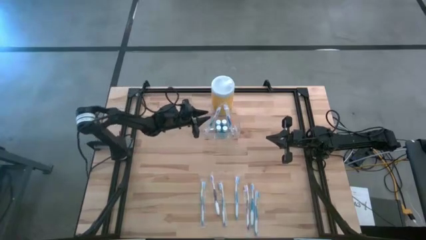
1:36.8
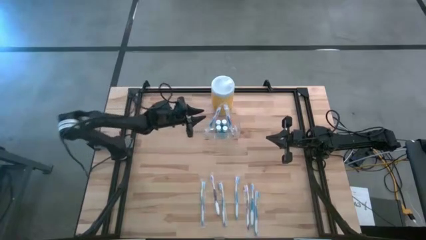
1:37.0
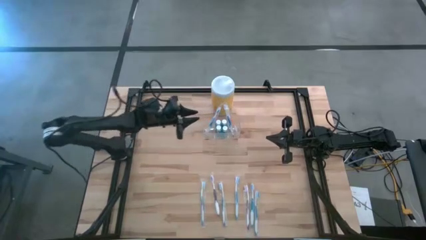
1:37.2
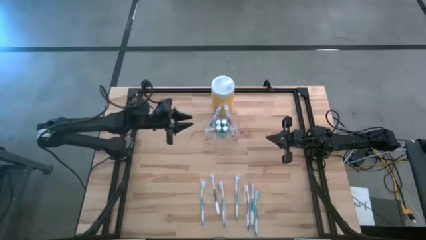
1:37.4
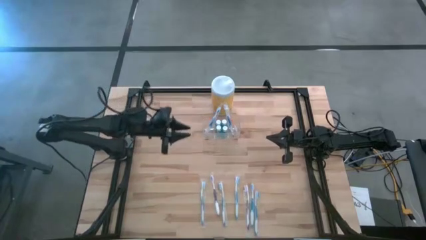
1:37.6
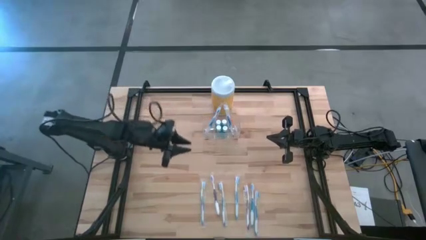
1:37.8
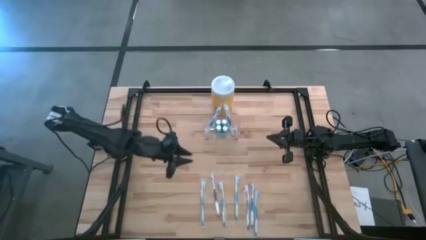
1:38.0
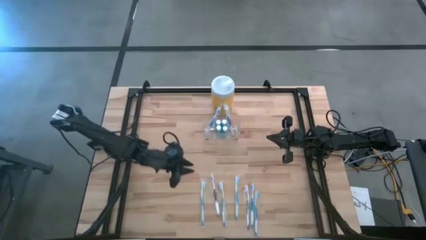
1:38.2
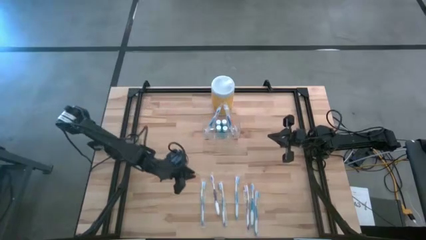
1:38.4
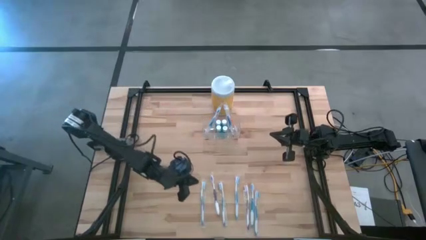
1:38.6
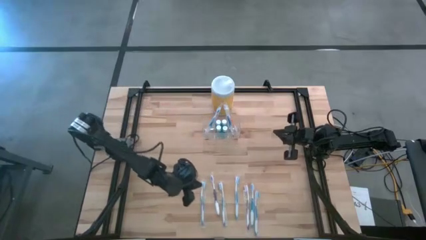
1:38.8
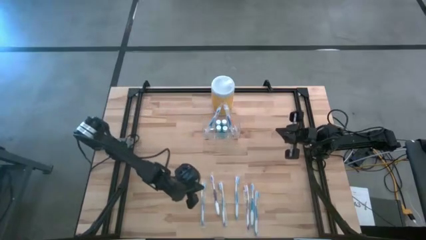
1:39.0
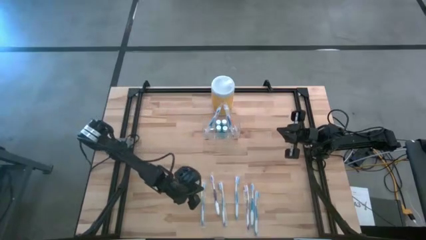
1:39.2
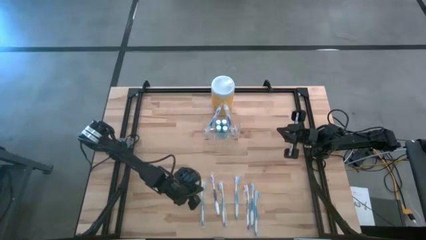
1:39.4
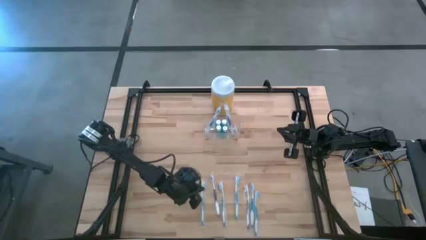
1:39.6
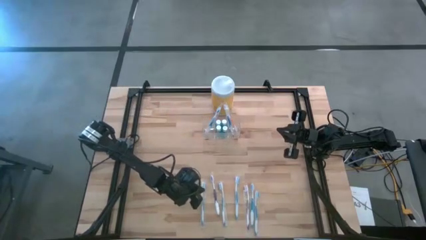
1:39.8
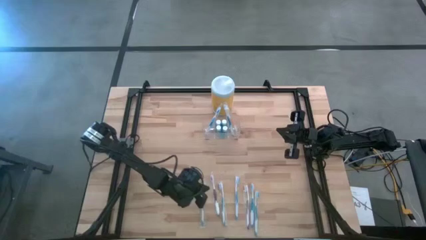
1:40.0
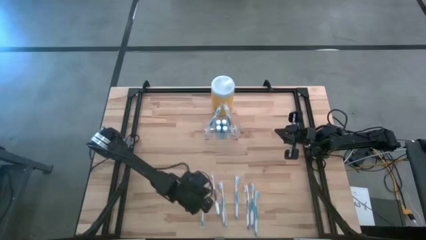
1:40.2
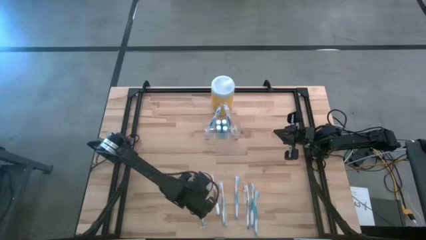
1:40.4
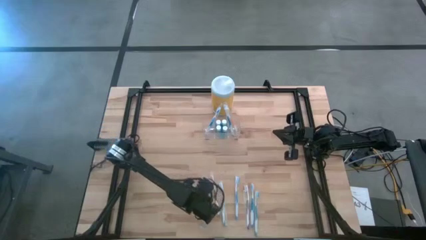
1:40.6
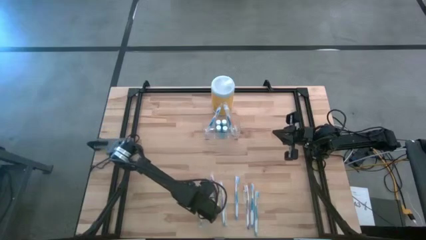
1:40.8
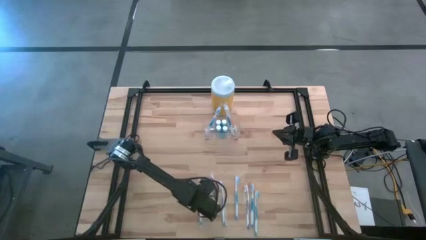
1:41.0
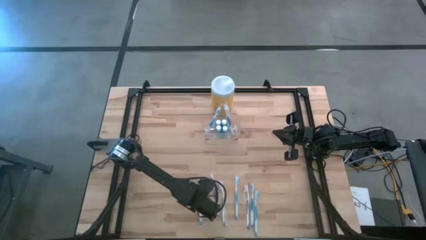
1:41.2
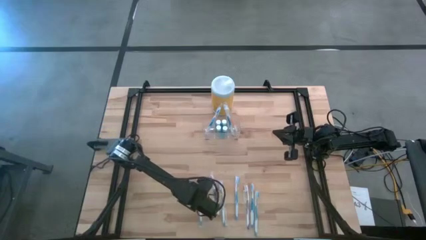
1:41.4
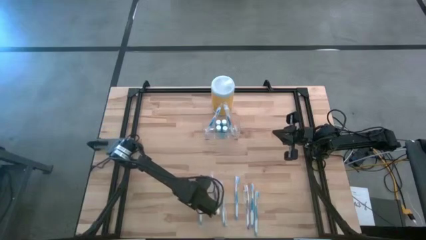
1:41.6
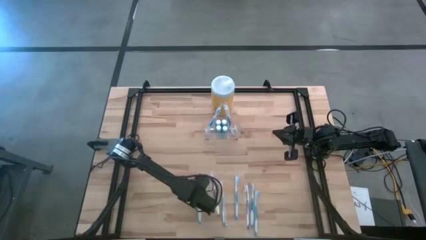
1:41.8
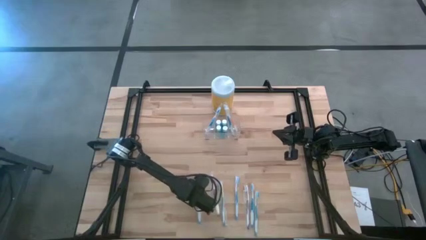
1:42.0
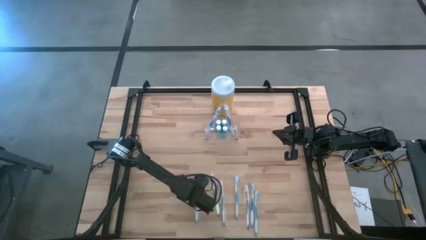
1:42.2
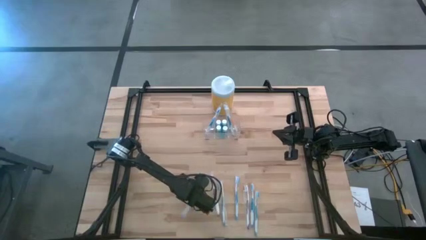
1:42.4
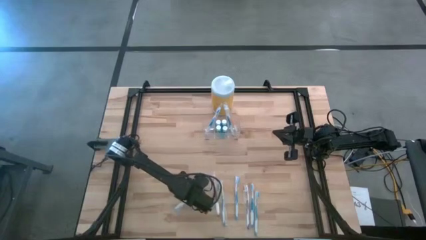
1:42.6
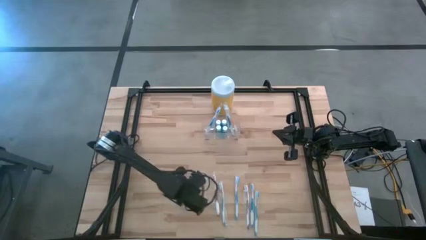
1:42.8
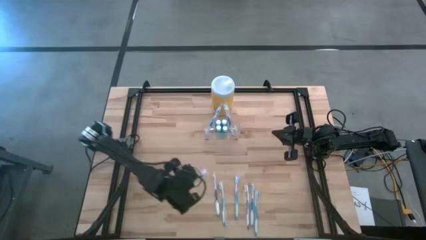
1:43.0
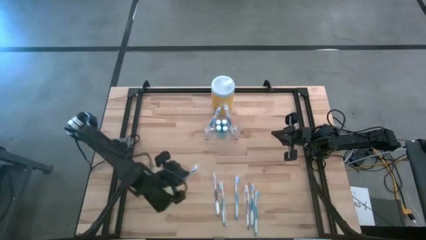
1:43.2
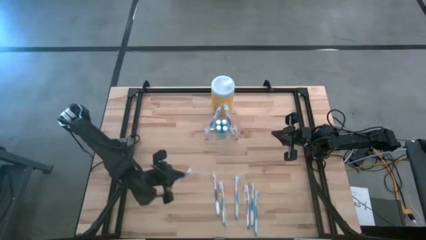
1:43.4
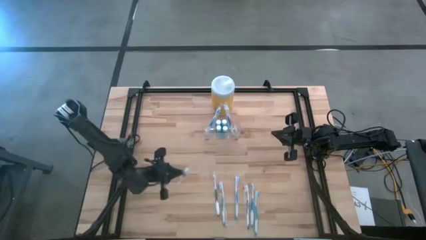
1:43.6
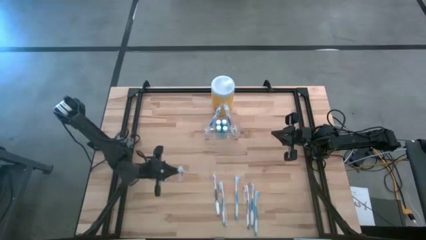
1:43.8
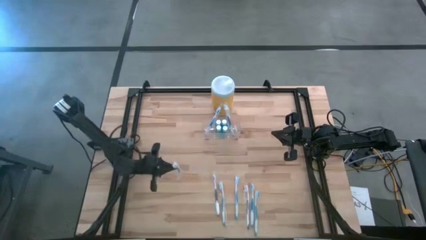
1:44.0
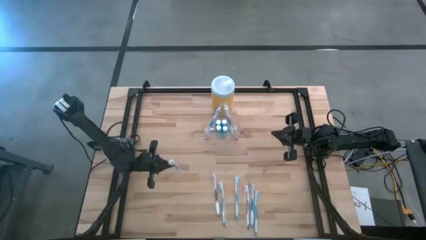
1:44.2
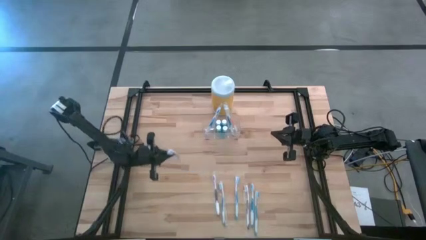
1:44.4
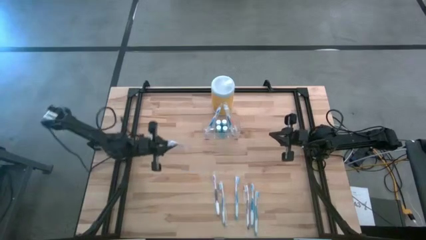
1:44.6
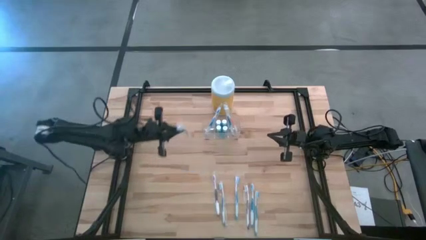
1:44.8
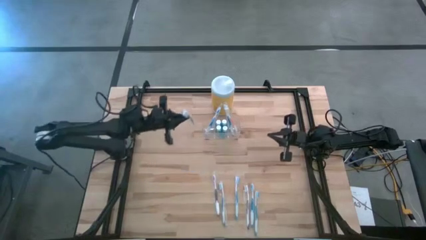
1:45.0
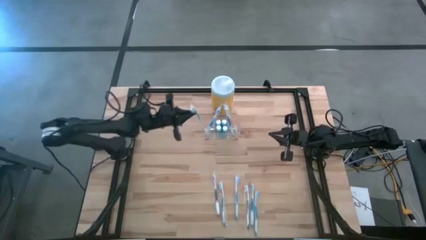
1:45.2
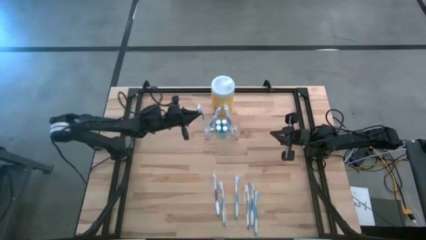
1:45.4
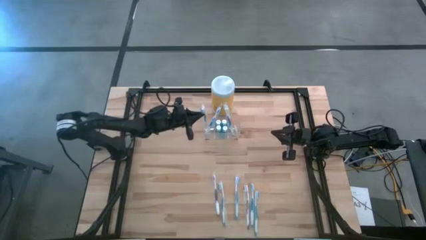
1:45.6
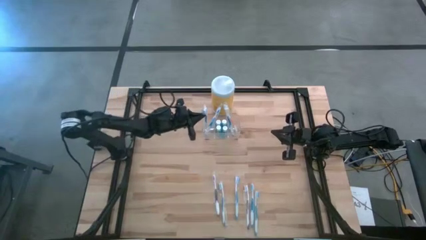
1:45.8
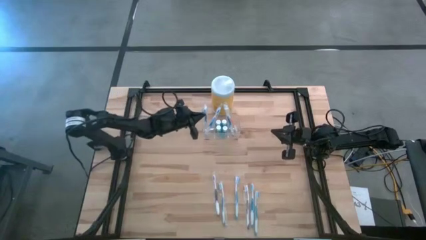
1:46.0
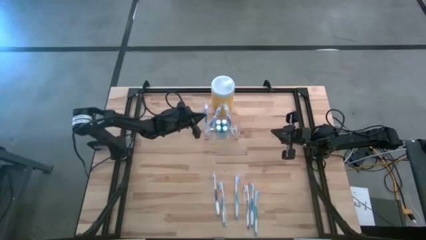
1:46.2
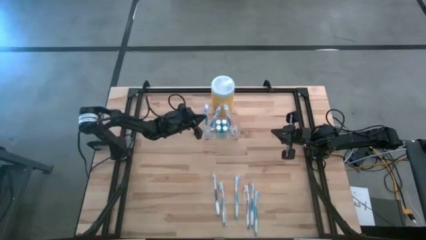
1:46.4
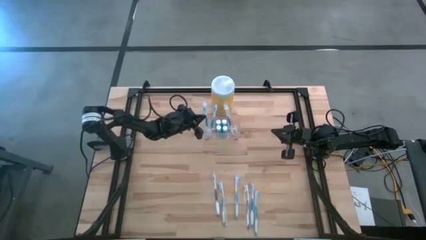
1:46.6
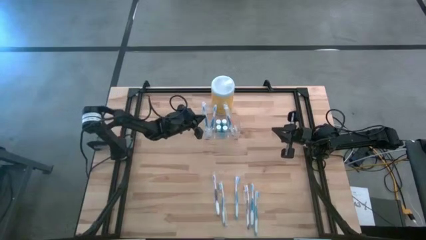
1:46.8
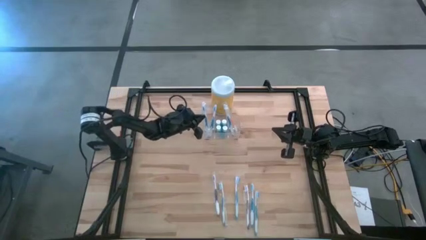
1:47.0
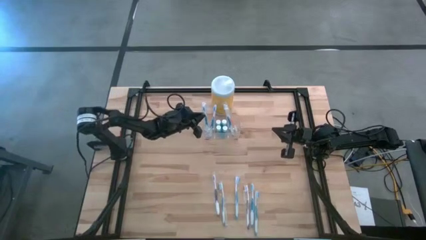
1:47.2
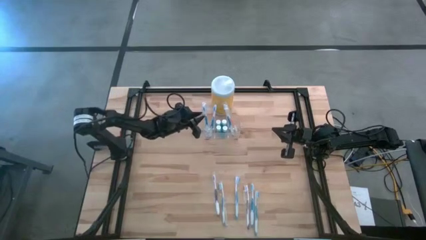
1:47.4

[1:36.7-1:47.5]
Task: Pick & Place toothbrushing station
Put the blue toothbrush into the transparent organizer

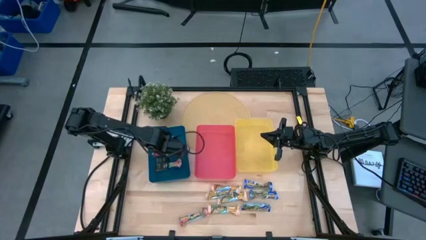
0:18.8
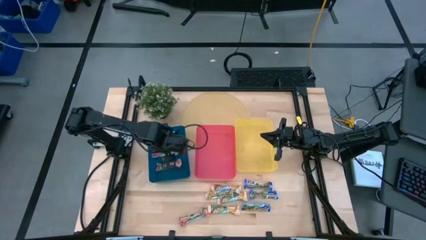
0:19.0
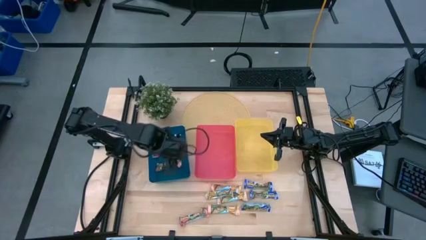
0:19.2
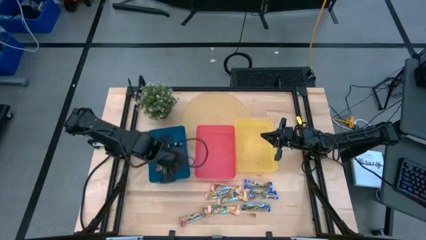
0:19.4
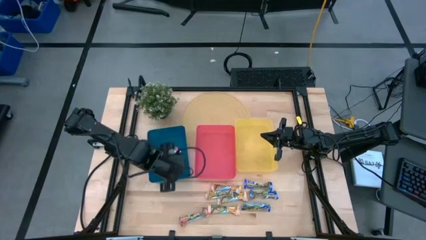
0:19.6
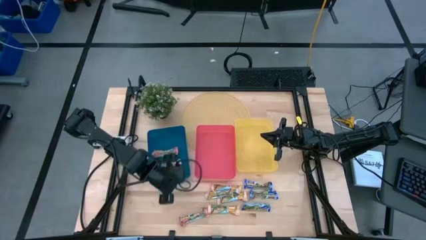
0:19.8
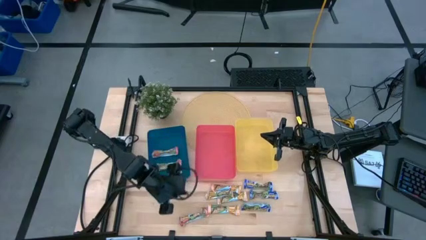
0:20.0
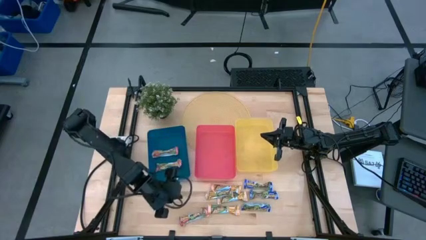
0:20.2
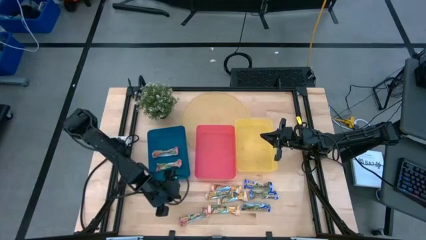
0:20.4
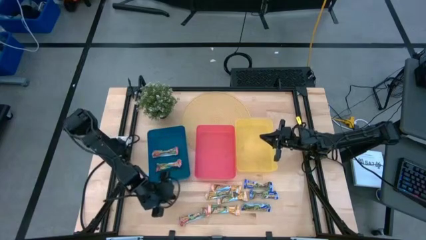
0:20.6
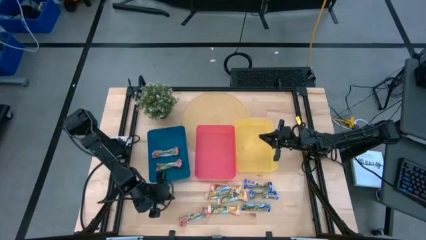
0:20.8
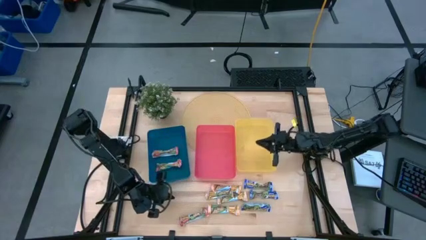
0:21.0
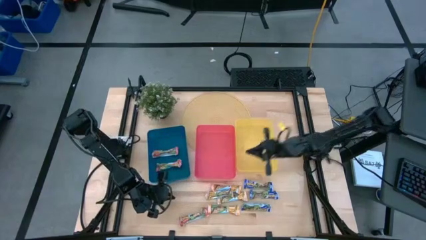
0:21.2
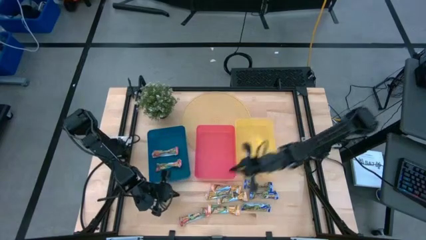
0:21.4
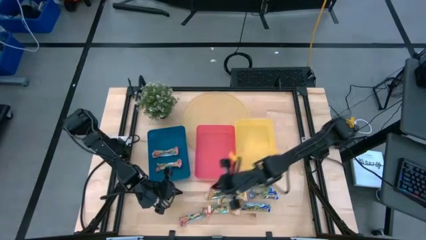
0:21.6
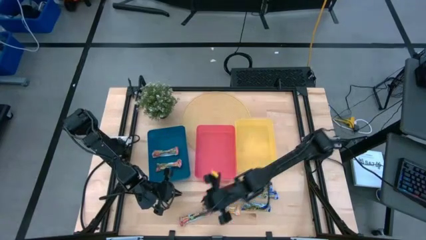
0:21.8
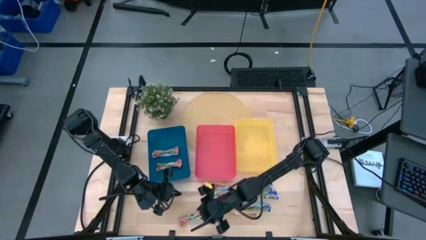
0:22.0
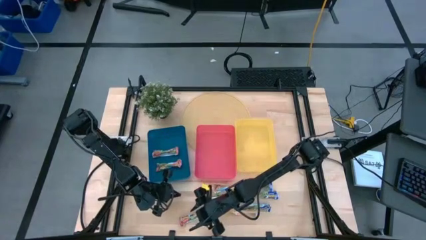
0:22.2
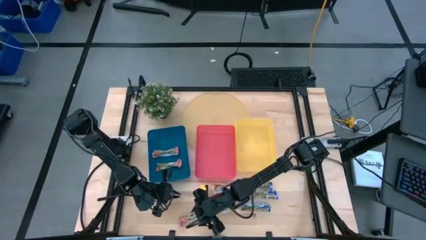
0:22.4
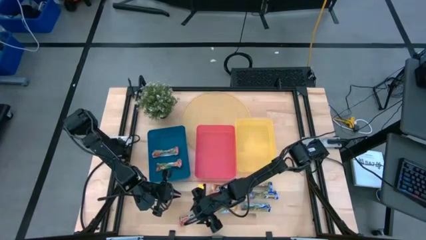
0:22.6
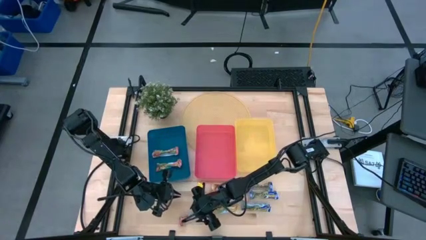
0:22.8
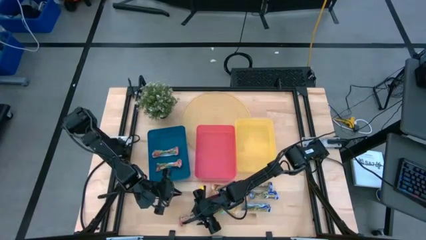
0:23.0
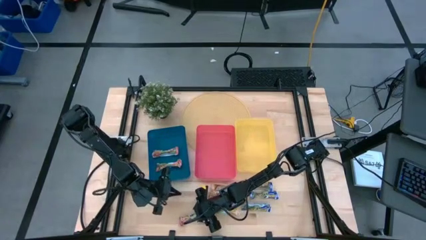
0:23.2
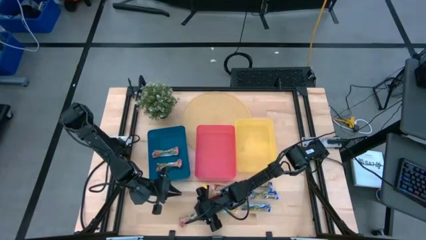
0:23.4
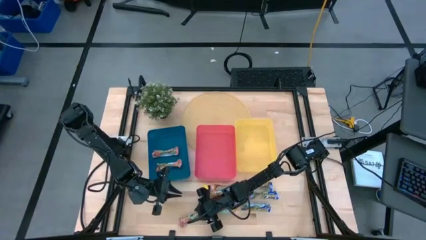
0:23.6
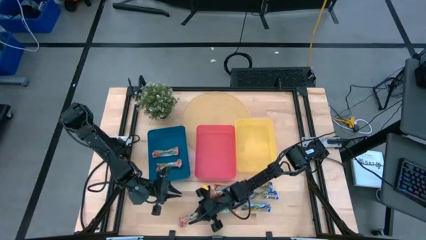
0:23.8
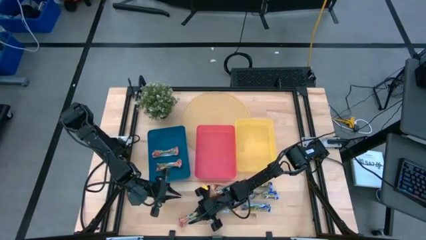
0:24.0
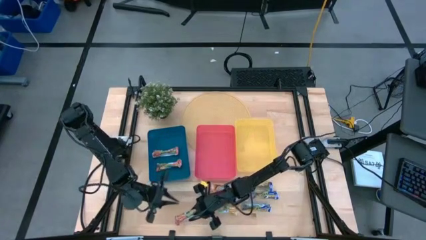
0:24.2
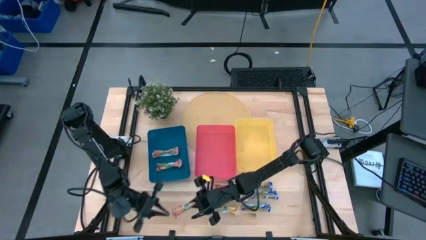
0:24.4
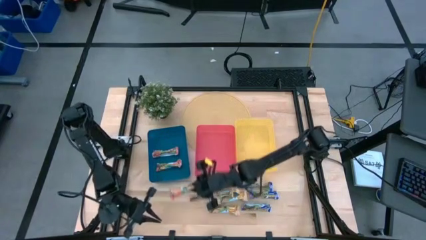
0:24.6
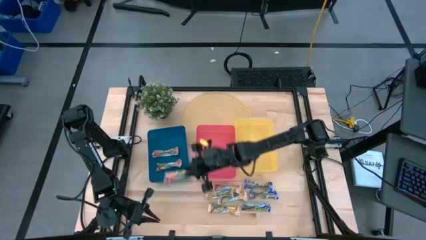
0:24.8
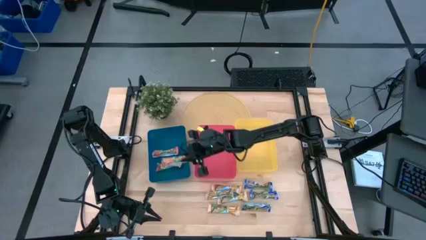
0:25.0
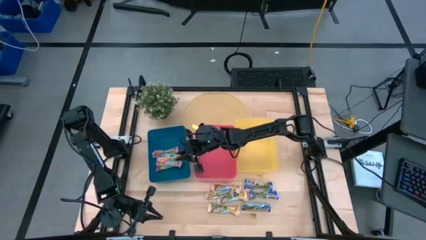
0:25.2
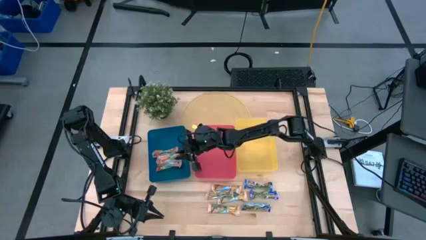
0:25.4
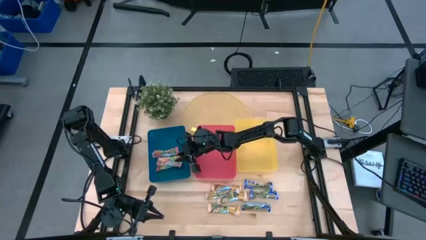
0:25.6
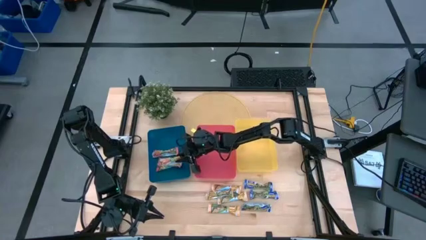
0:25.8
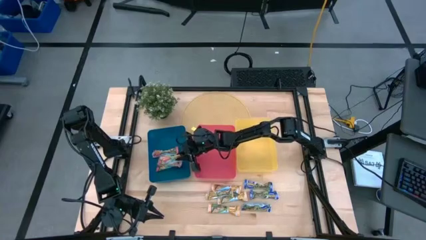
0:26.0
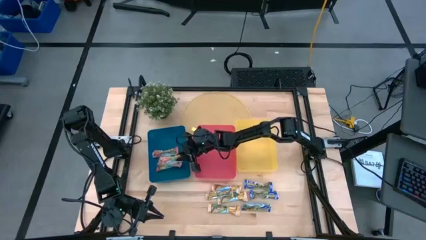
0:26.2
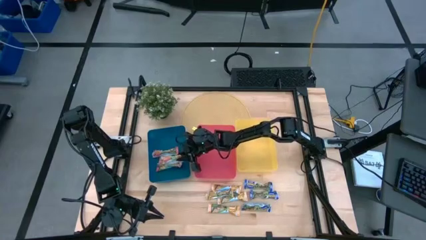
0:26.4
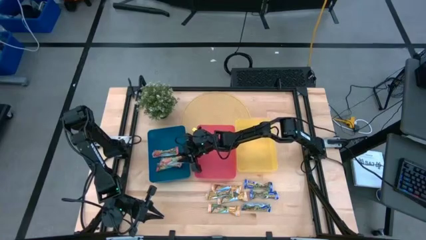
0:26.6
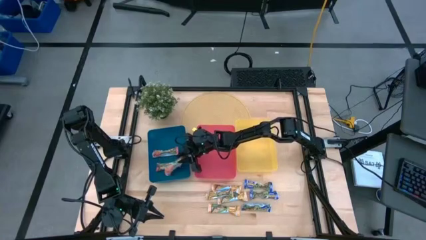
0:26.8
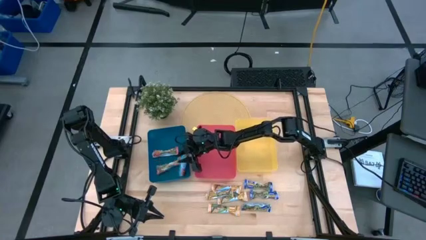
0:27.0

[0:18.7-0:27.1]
Task: Pick and place Granola Bars by type
Put the red granola bar into the blue bin
